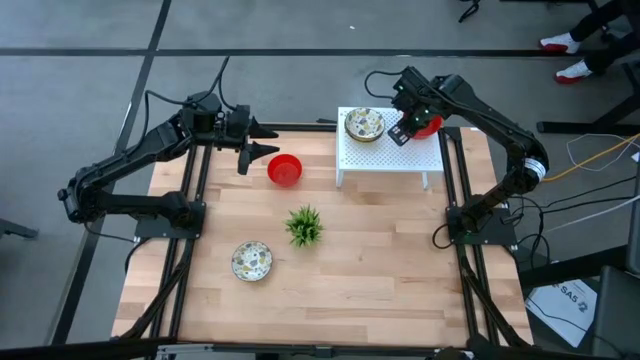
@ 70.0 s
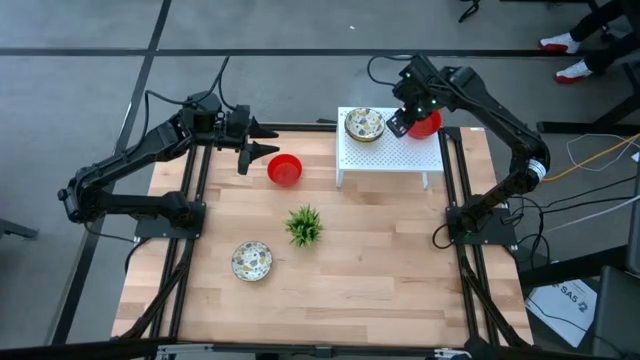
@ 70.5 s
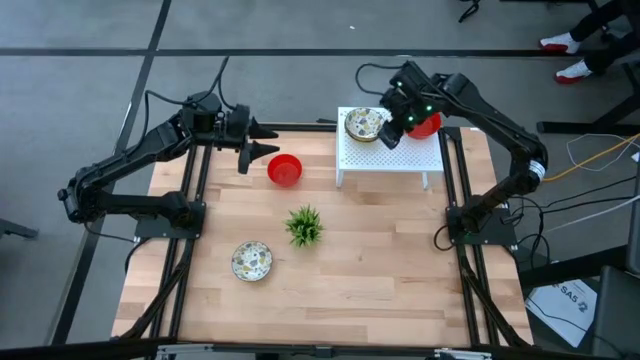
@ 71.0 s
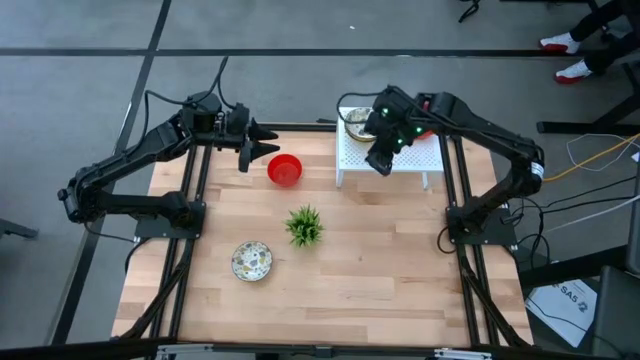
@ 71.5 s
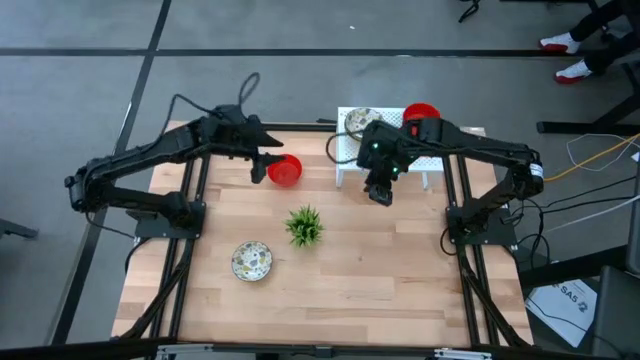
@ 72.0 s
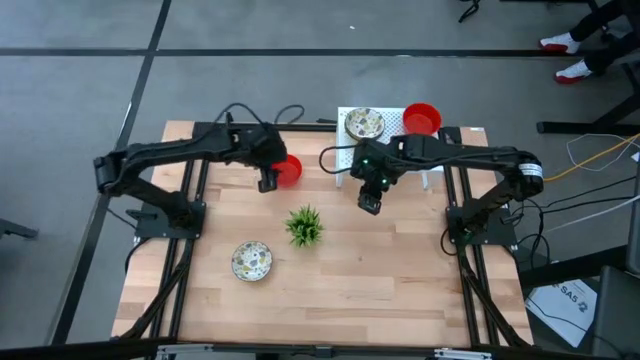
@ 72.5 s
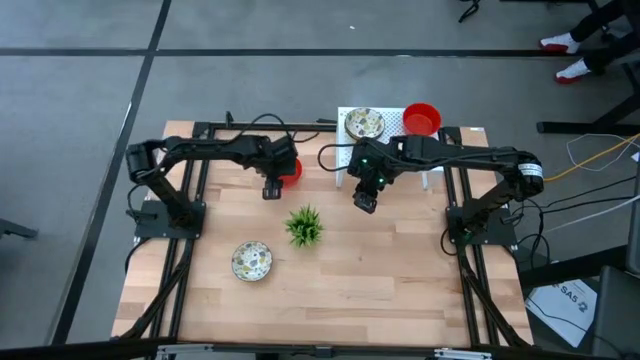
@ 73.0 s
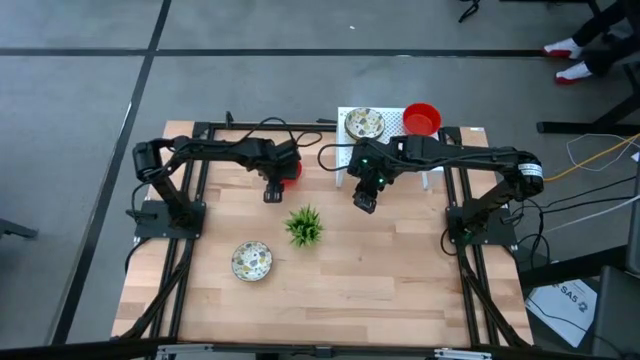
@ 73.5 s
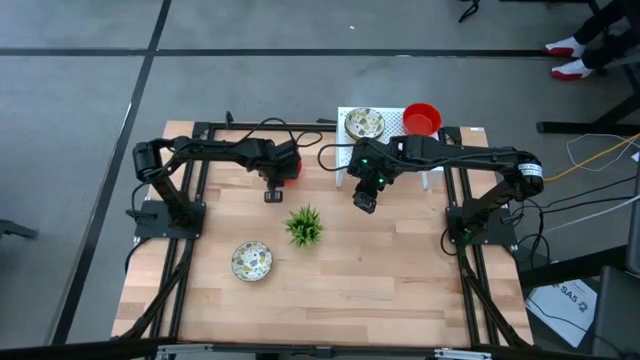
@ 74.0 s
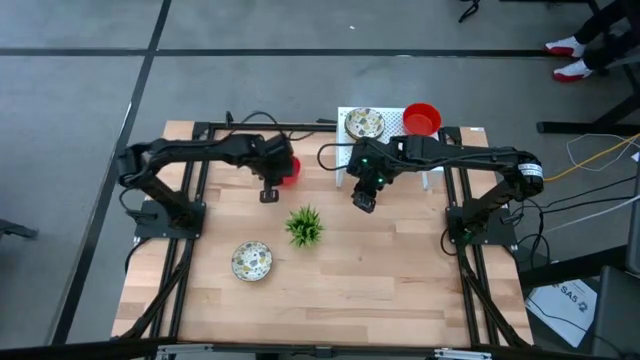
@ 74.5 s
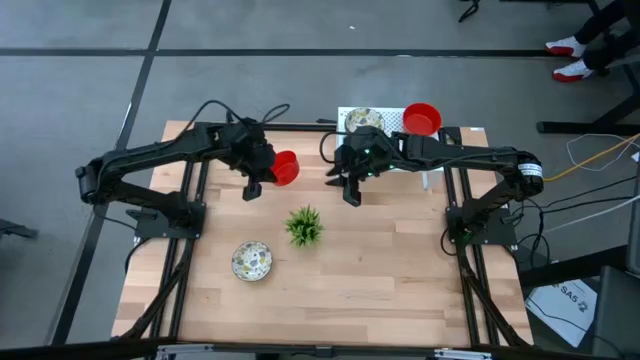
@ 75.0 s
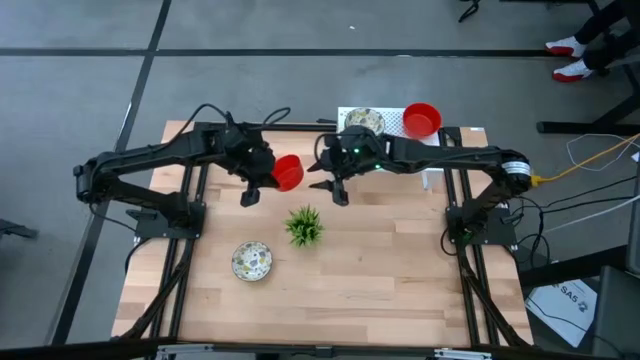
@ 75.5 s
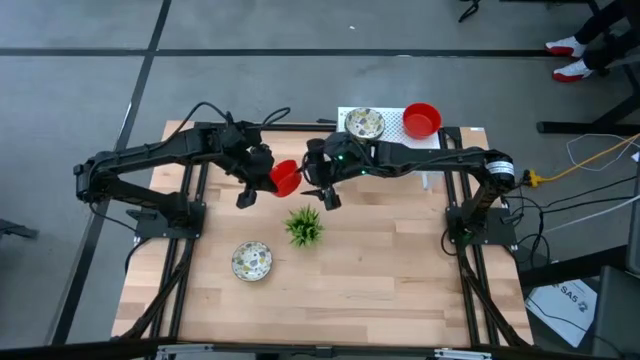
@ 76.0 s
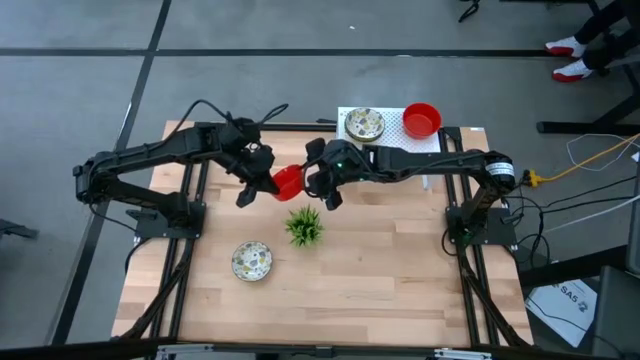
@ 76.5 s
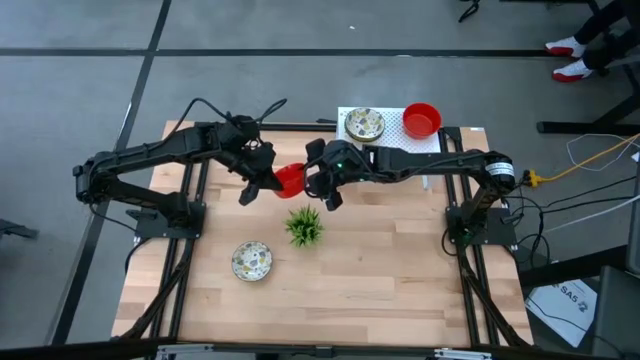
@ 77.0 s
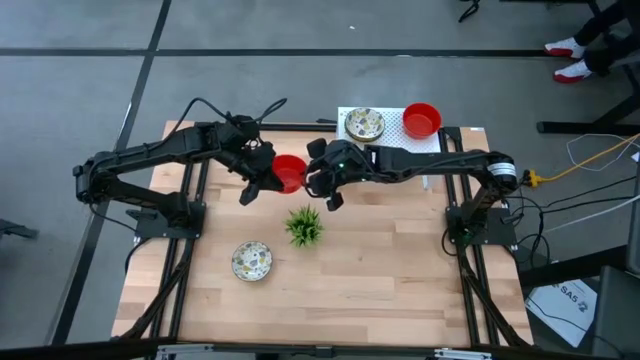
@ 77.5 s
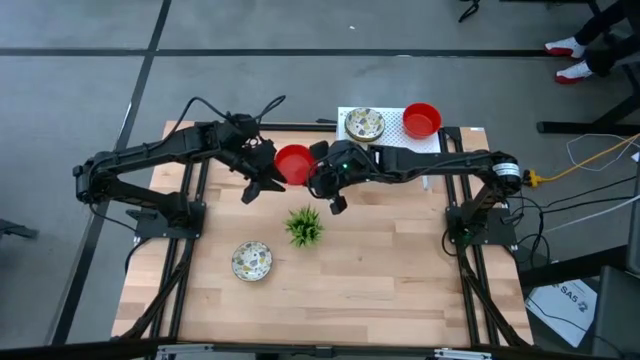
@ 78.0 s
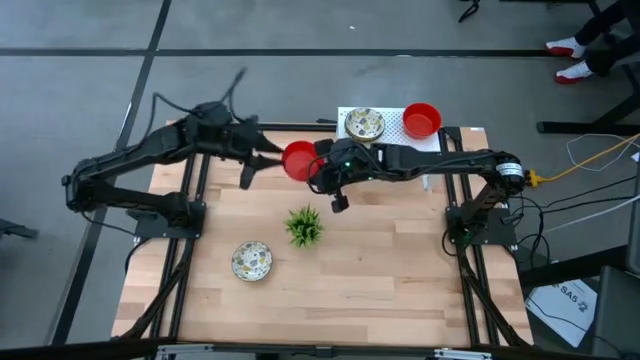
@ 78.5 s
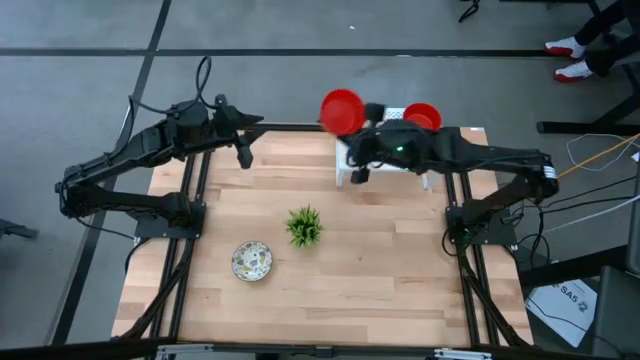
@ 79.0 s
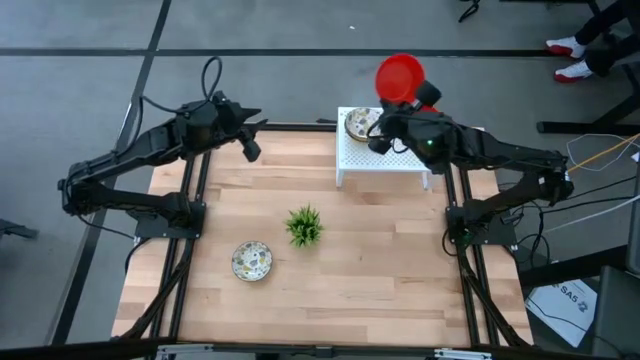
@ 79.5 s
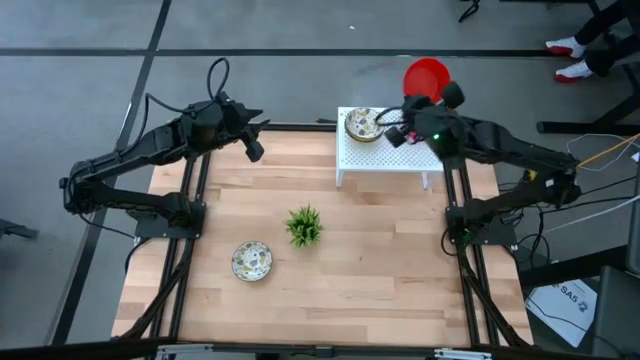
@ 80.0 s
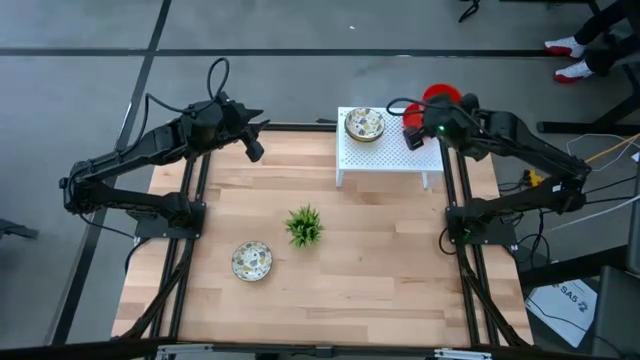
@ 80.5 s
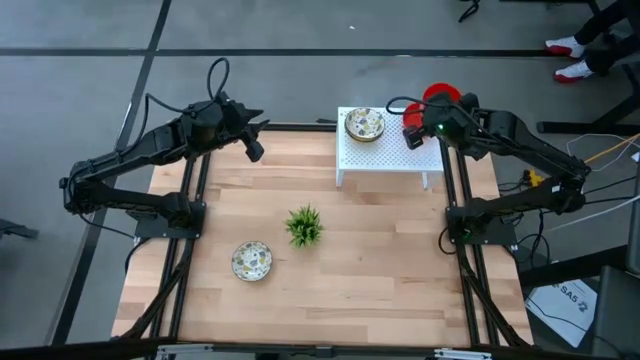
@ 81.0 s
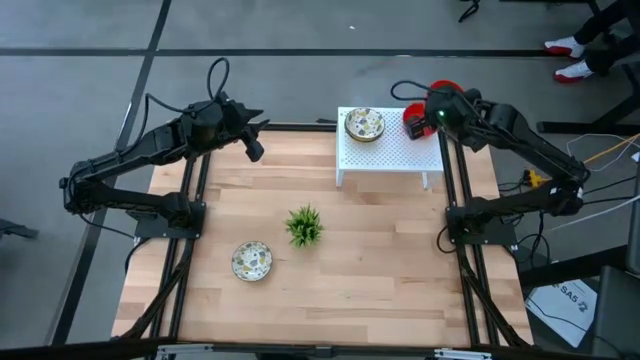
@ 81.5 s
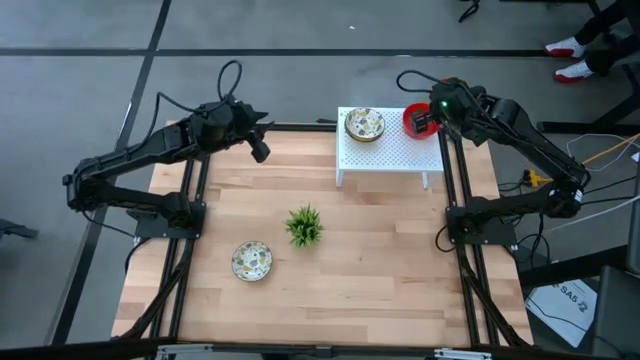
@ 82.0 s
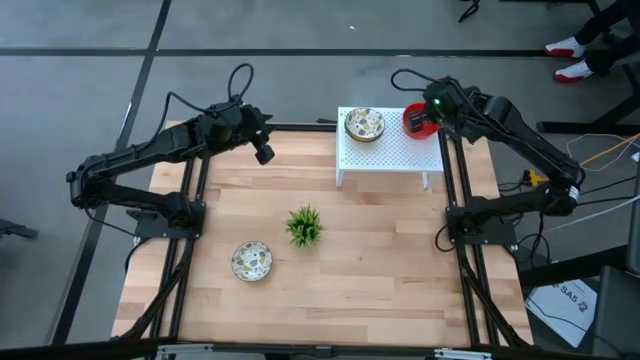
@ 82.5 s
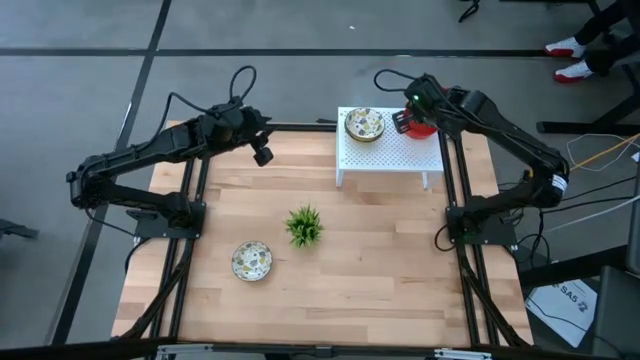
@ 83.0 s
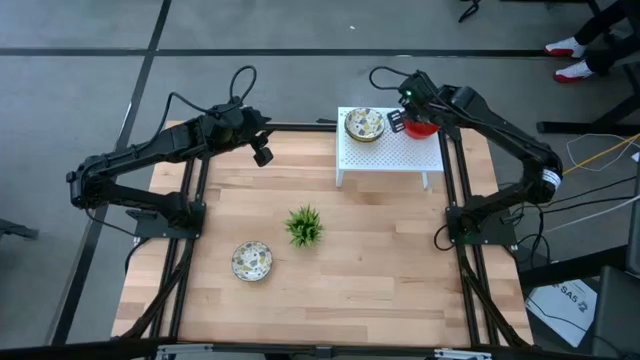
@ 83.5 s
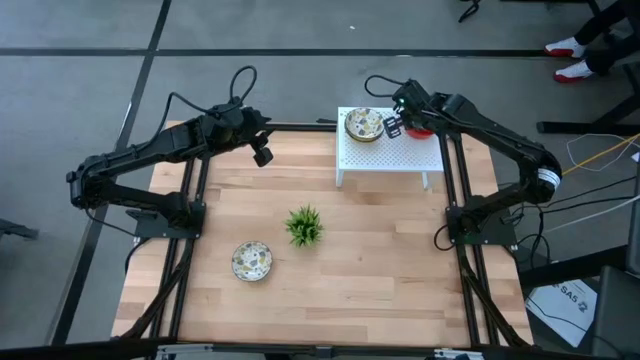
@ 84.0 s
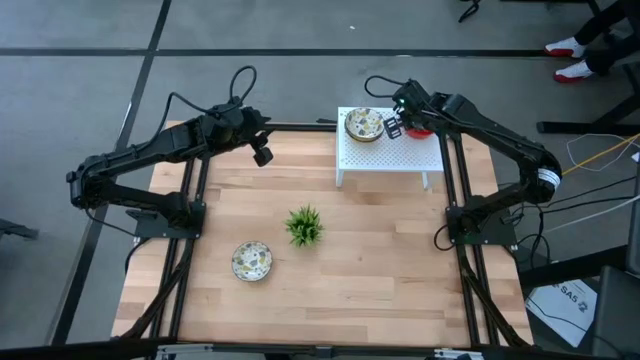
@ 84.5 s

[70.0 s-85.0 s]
Task: Pick & Place Mini bowls
Stack the red bowl on the red bowl on the shelf

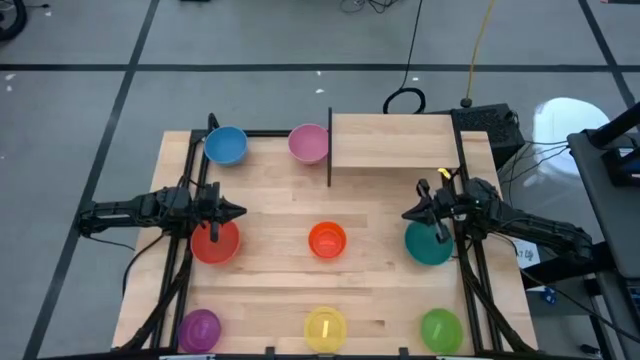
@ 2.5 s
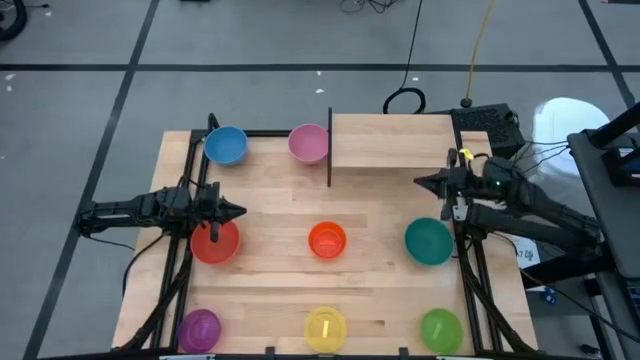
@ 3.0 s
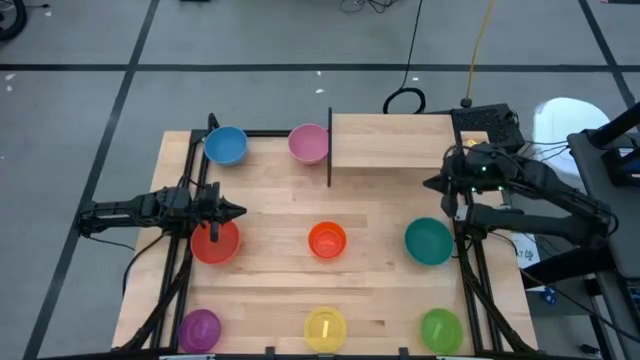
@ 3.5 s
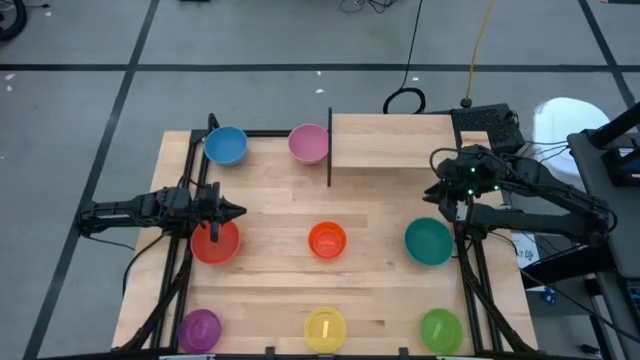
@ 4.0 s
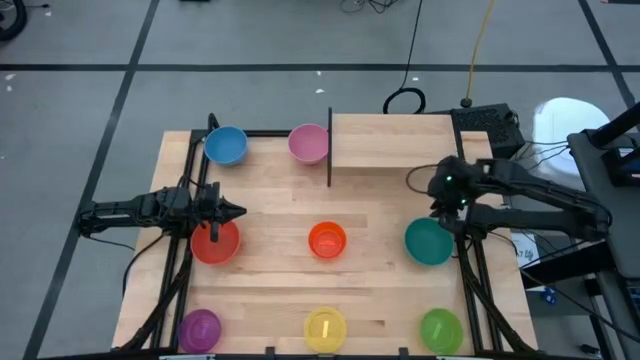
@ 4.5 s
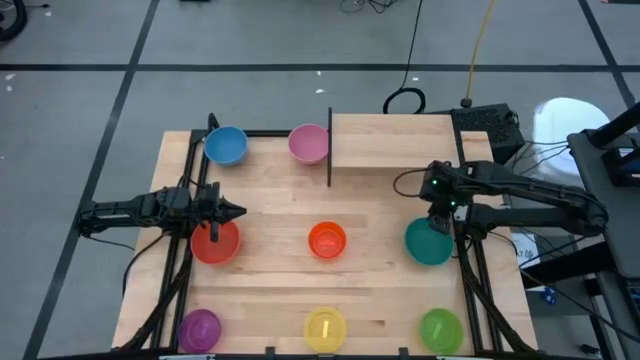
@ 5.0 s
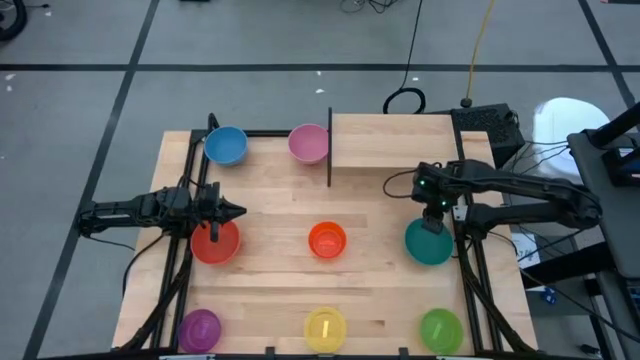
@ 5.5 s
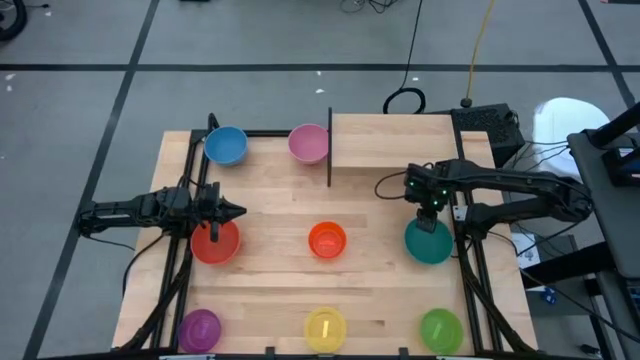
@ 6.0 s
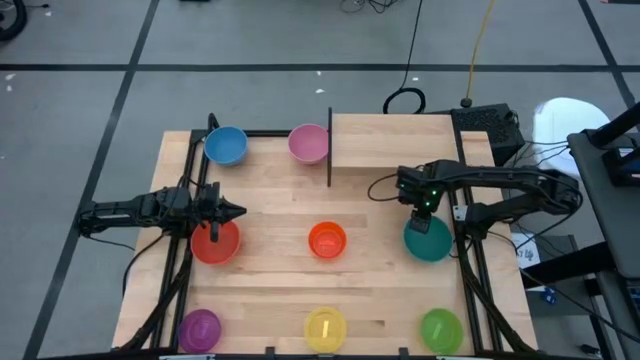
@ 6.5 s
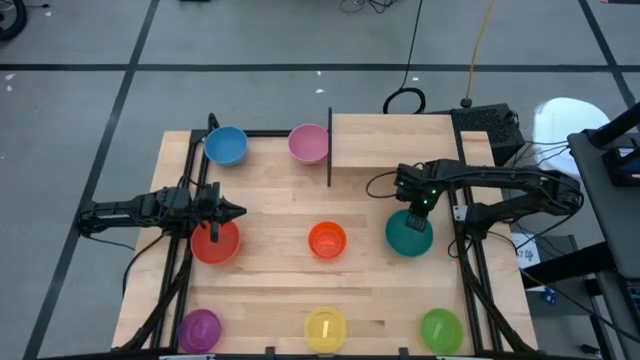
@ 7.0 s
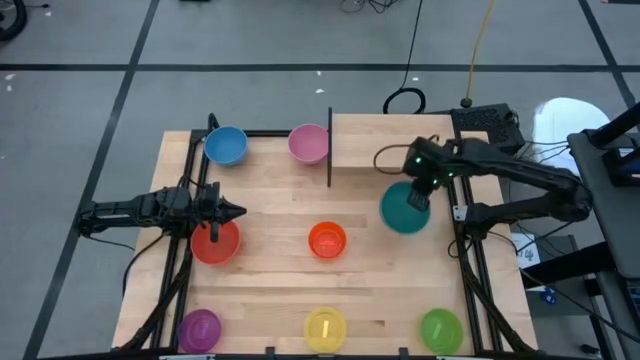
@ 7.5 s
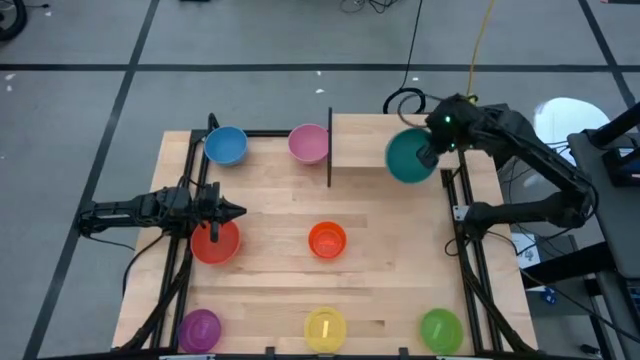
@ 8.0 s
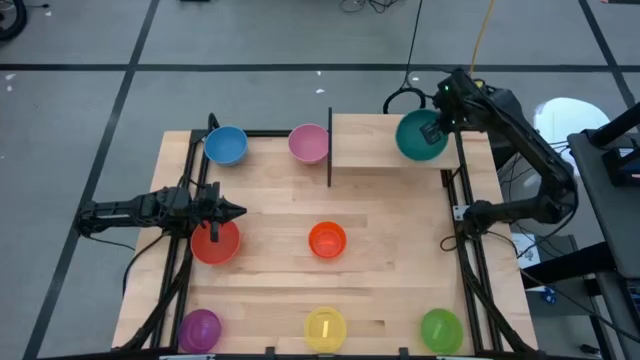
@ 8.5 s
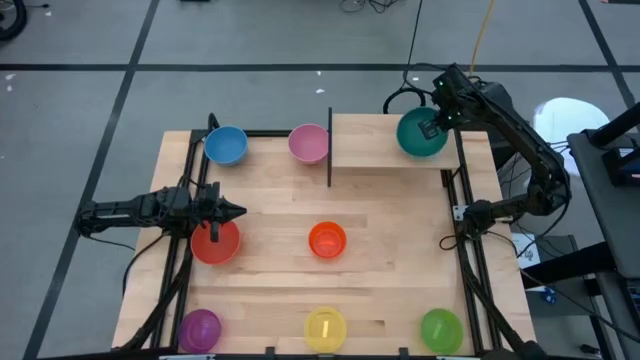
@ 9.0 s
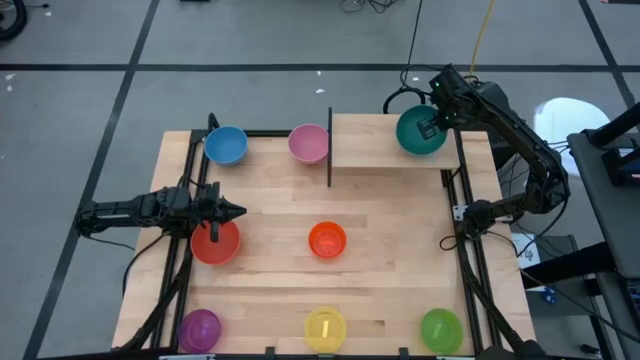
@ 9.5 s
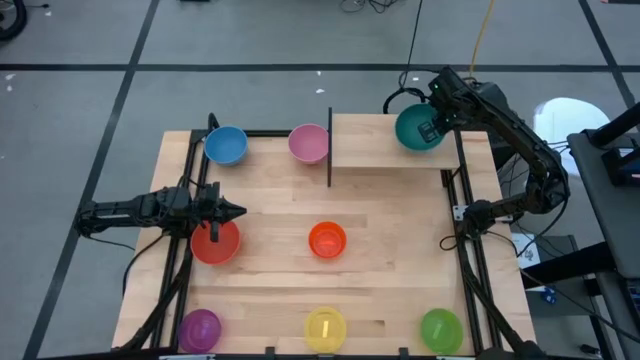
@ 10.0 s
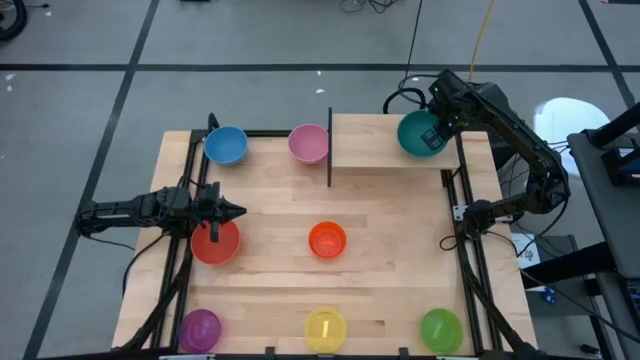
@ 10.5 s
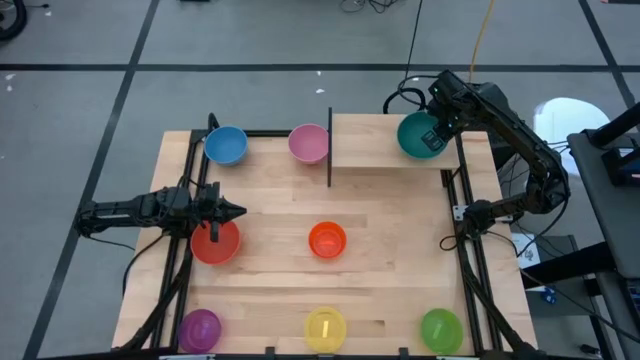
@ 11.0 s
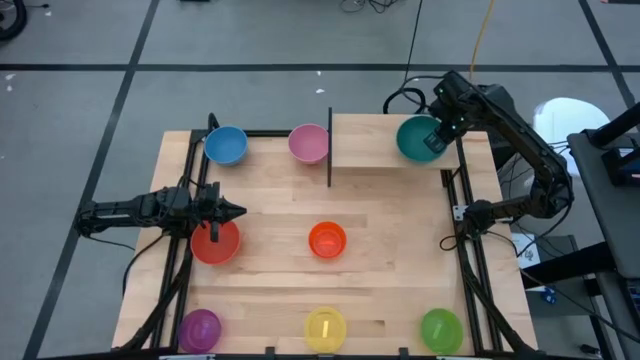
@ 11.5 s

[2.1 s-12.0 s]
Task: Place and stack bowls onto a shelf
Put the dark blue bowl on the shelf
